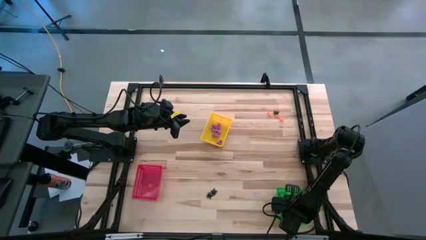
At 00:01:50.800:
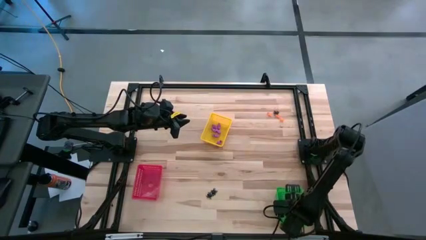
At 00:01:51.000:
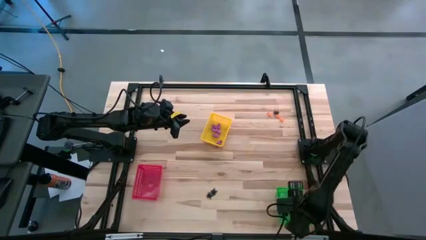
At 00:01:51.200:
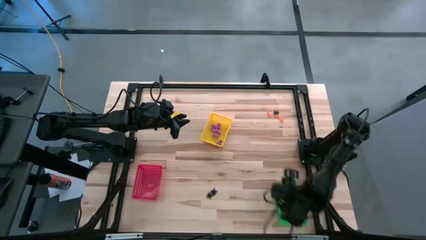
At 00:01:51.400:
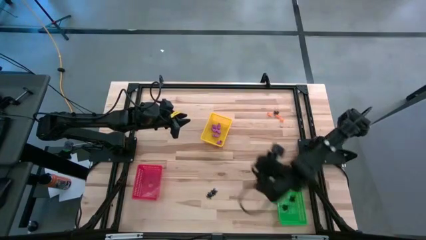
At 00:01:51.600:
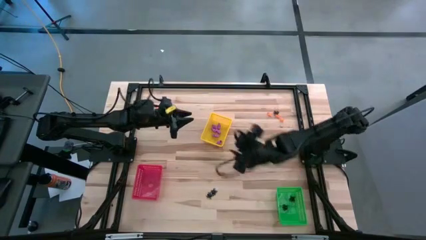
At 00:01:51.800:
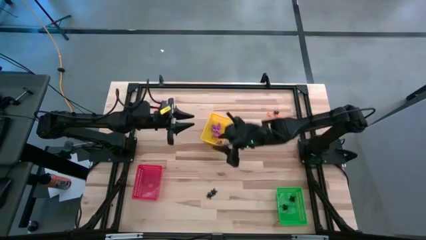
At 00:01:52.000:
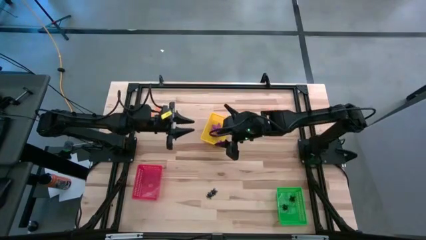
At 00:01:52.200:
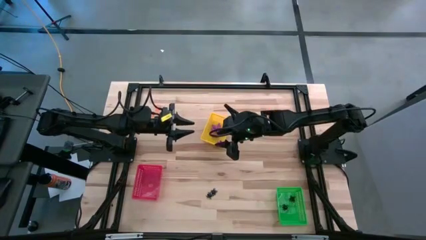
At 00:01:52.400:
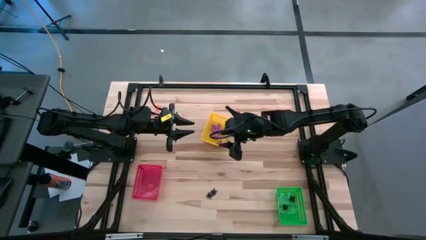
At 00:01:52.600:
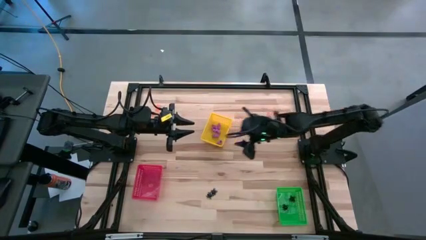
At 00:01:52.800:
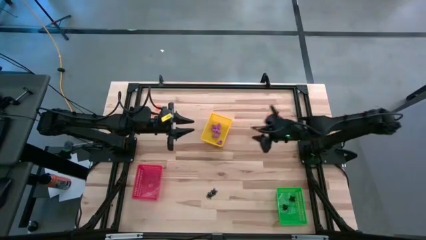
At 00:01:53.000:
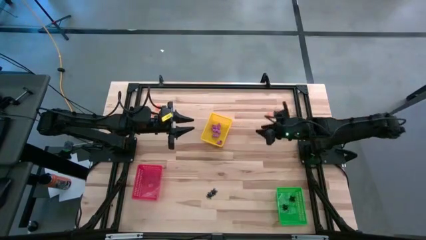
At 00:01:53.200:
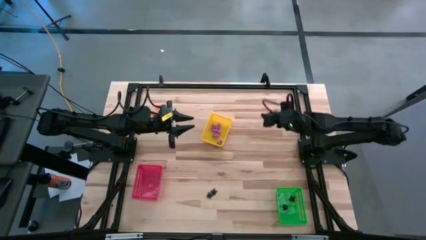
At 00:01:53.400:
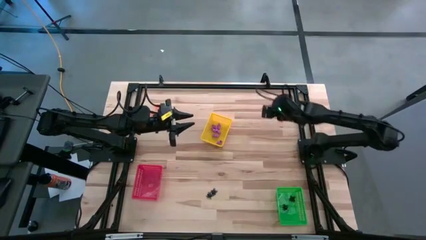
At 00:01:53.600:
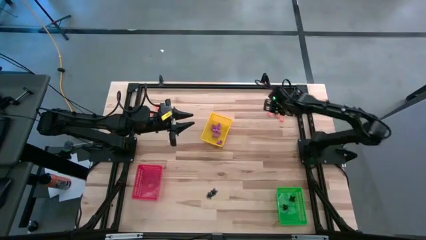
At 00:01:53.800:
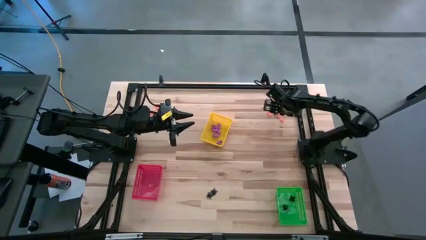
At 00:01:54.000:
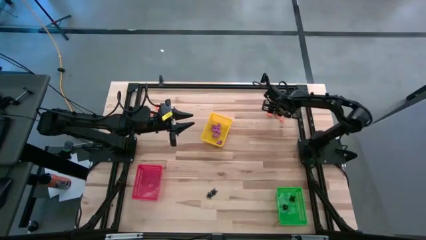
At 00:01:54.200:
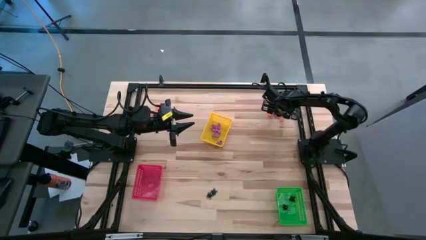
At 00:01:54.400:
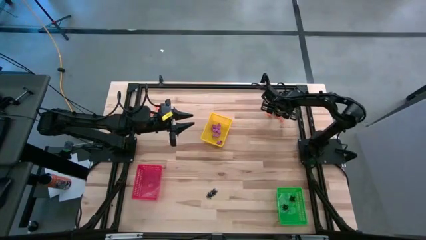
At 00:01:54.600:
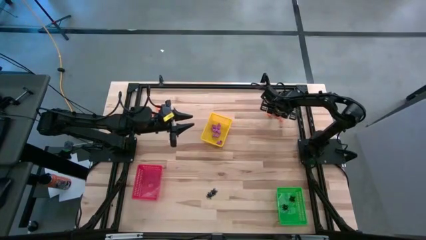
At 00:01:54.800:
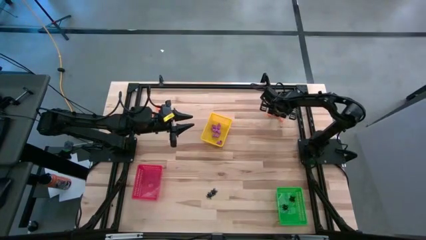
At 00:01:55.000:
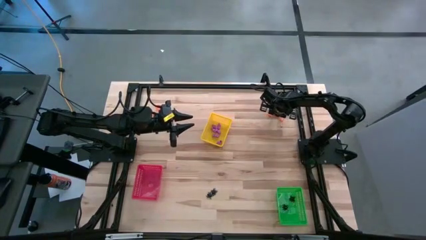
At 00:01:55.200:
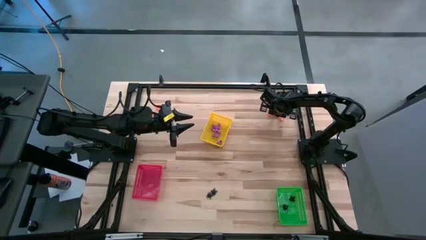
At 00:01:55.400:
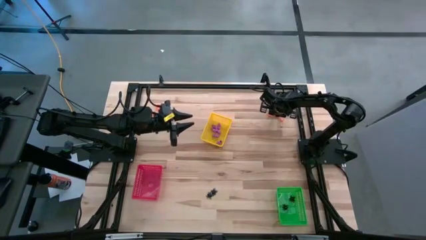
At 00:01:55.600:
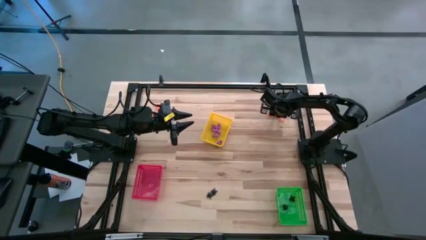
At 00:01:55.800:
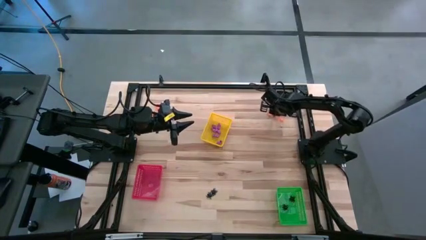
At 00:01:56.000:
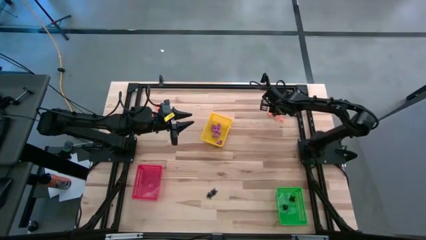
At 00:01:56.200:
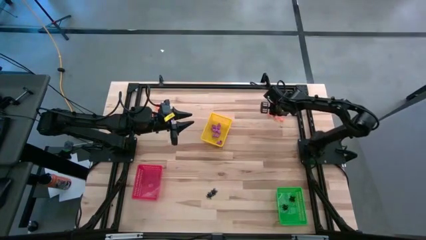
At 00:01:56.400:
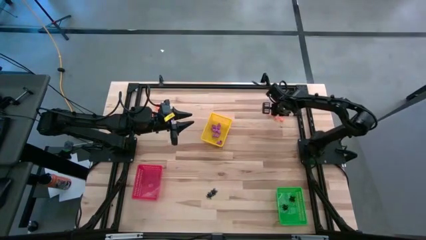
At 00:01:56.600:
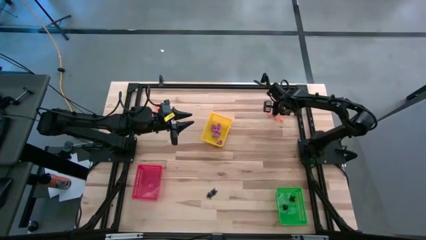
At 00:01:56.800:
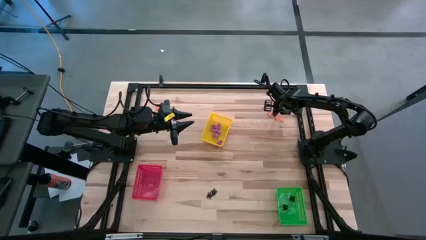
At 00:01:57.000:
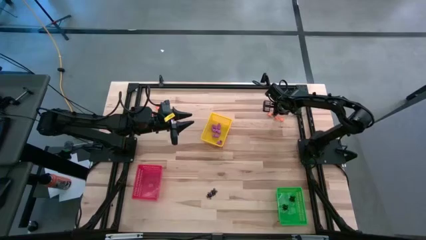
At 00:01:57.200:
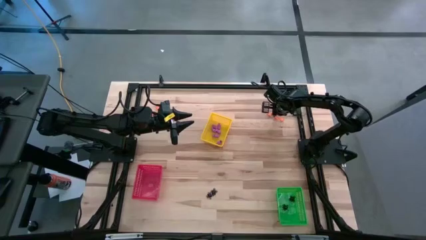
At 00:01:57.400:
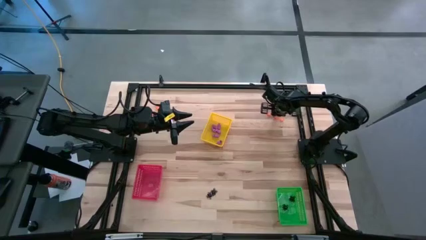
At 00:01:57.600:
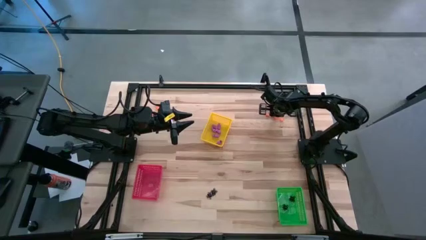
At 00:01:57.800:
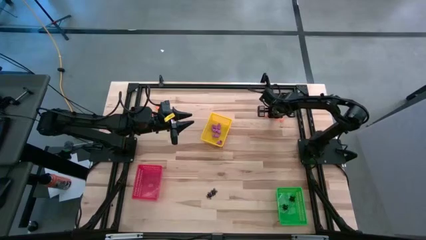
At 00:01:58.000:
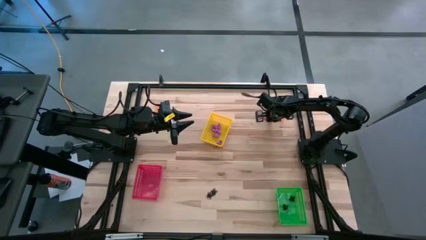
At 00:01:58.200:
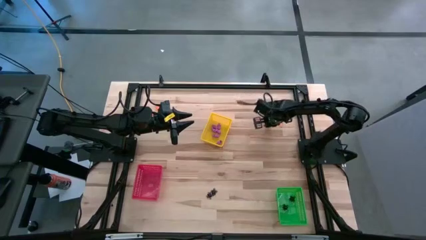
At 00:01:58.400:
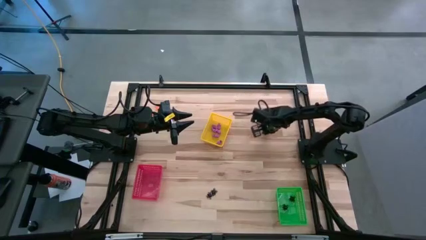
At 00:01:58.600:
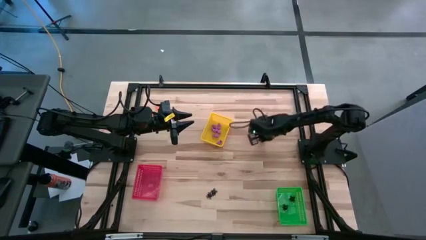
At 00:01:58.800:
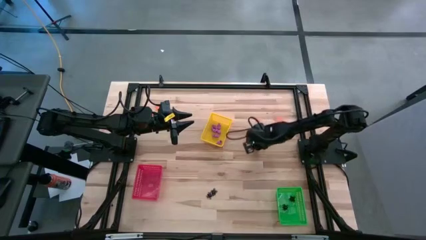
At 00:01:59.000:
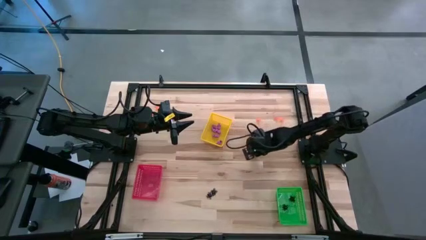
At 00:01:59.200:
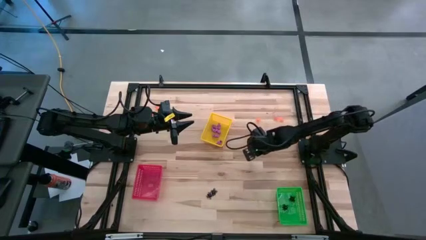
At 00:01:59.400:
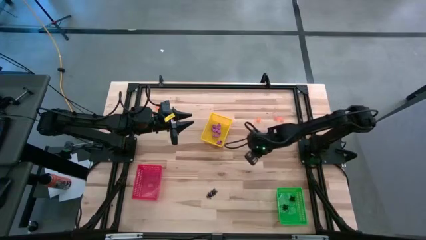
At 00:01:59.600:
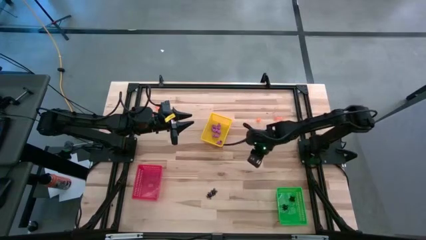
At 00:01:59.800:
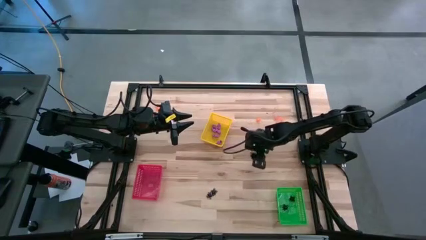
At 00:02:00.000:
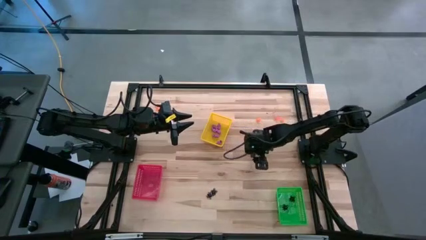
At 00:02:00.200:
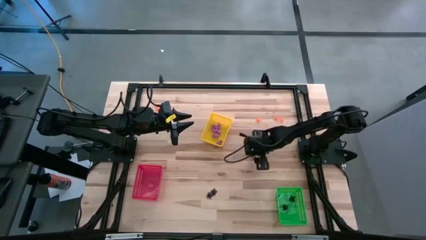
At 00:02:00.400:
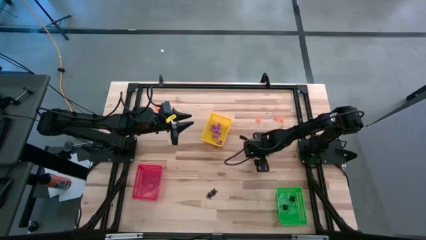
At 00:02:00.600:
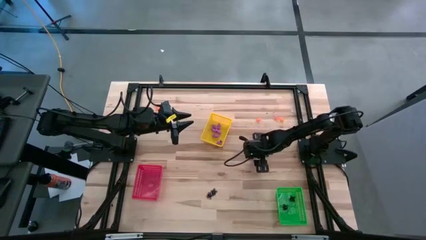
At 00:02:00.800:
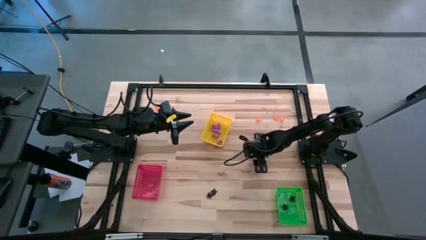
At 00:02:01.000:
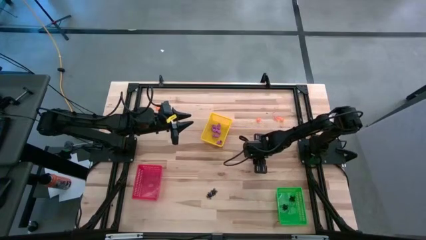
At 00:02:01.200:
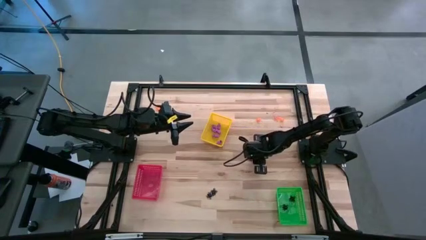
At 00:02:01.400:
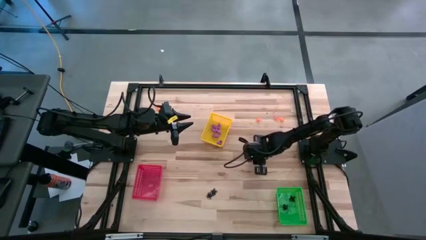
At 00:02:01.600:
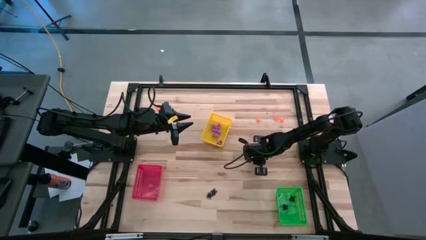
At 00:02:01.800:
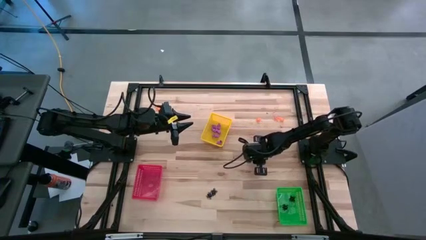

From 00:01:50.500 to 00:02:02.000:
Task: Sort Halloween decoration
Put the black spider toy into the green bin

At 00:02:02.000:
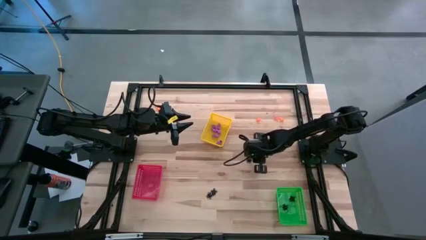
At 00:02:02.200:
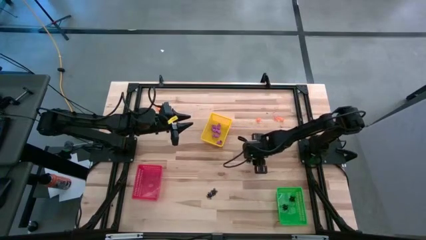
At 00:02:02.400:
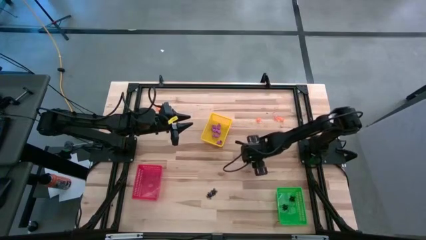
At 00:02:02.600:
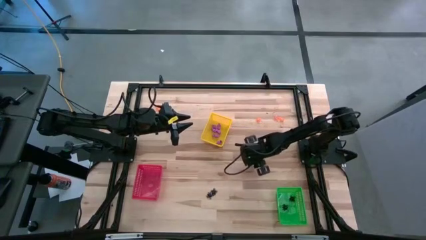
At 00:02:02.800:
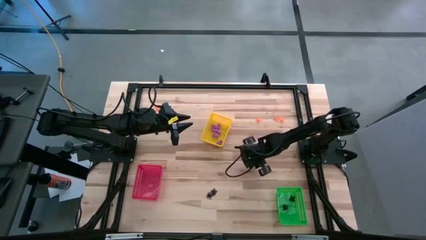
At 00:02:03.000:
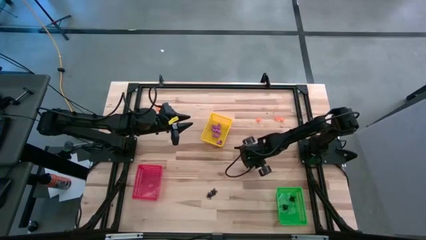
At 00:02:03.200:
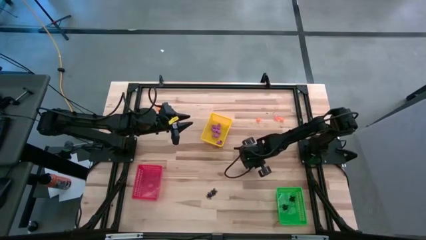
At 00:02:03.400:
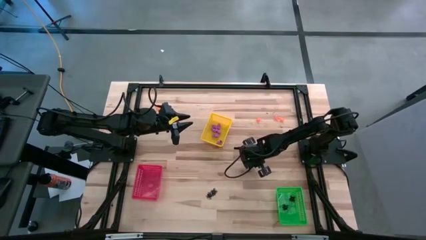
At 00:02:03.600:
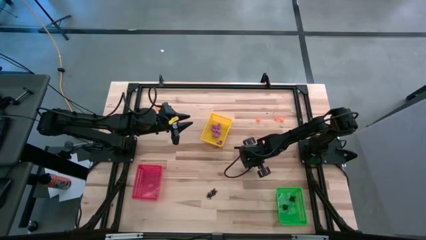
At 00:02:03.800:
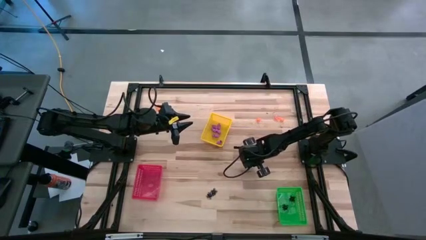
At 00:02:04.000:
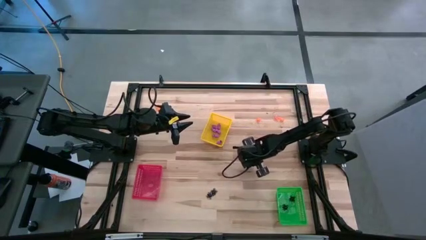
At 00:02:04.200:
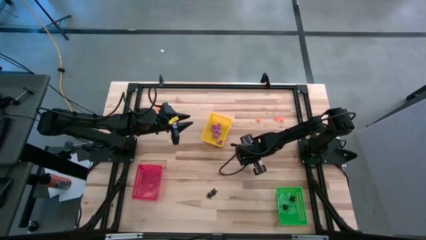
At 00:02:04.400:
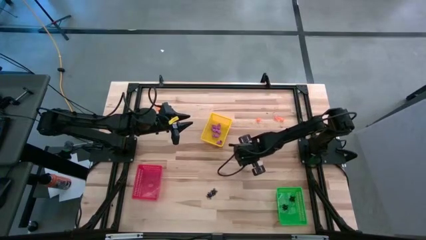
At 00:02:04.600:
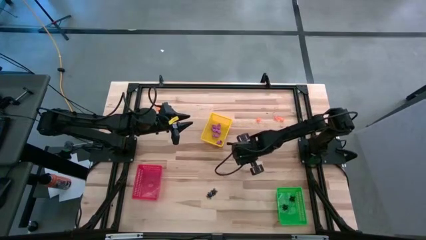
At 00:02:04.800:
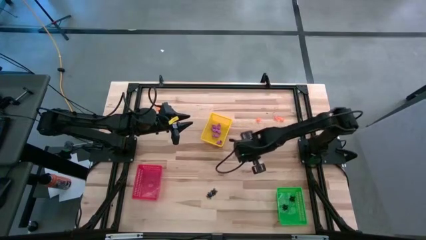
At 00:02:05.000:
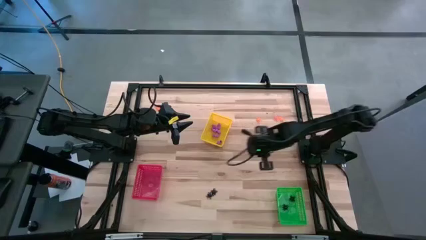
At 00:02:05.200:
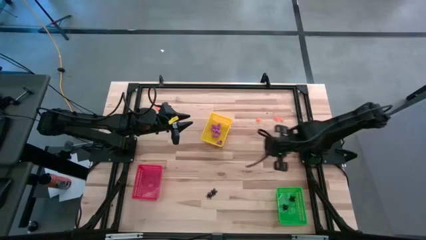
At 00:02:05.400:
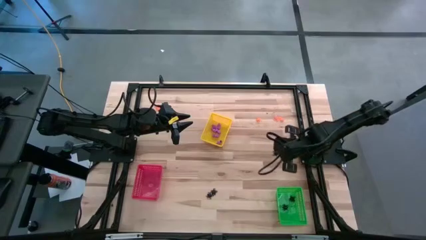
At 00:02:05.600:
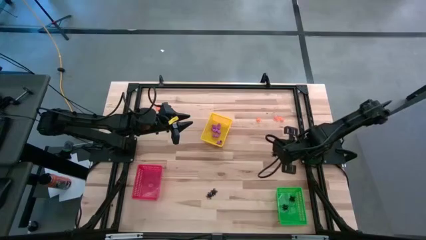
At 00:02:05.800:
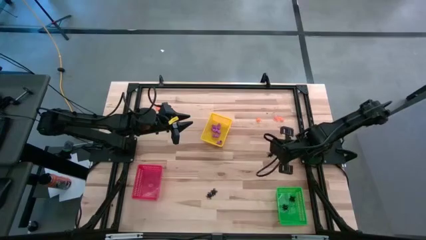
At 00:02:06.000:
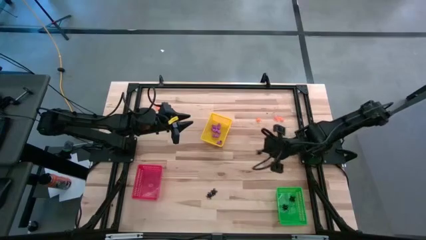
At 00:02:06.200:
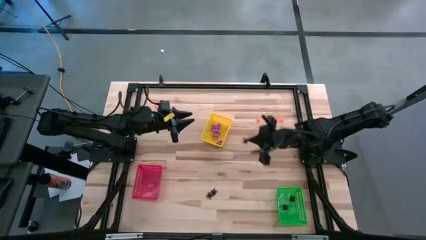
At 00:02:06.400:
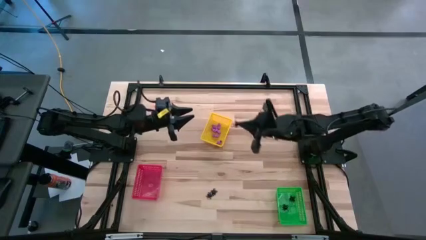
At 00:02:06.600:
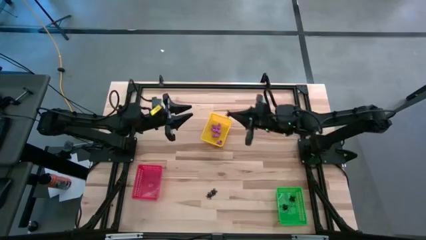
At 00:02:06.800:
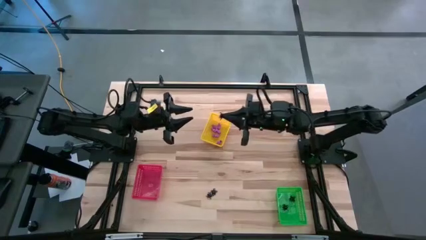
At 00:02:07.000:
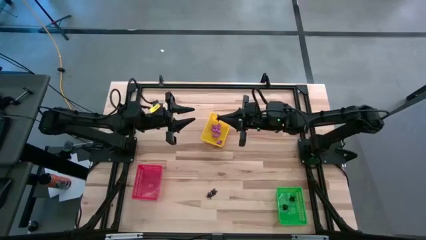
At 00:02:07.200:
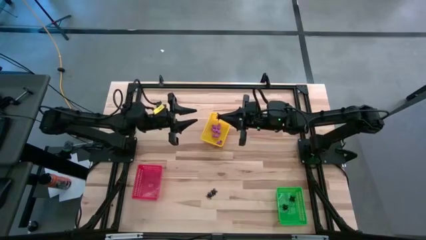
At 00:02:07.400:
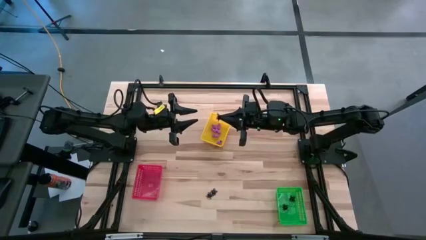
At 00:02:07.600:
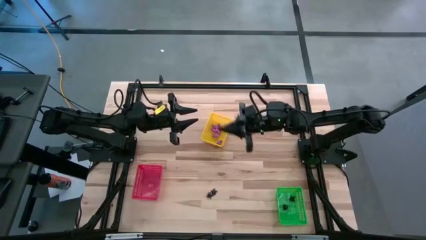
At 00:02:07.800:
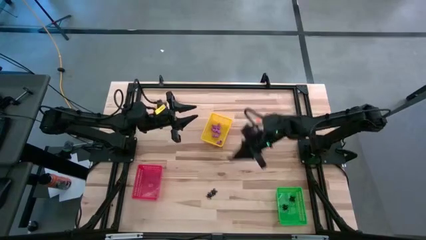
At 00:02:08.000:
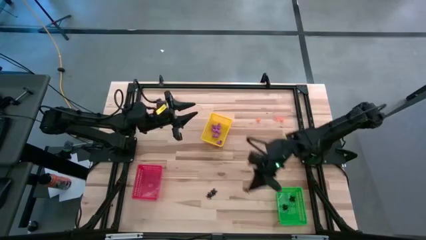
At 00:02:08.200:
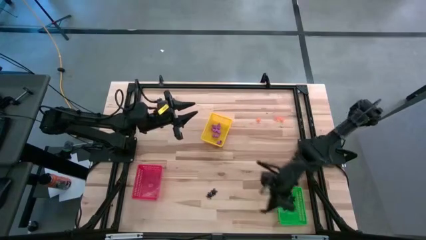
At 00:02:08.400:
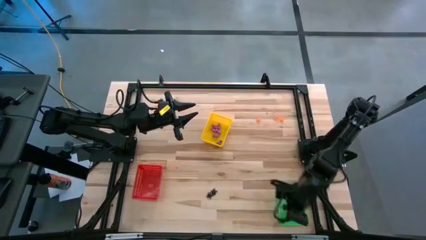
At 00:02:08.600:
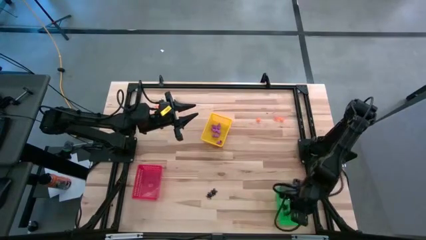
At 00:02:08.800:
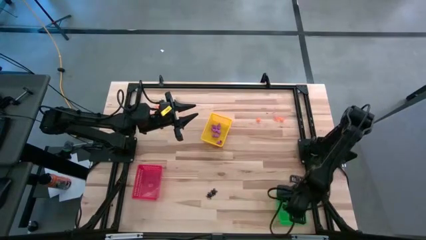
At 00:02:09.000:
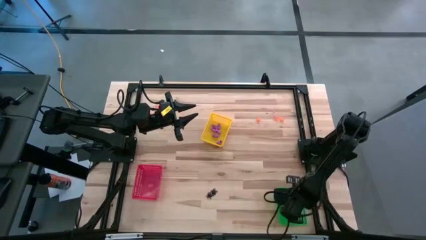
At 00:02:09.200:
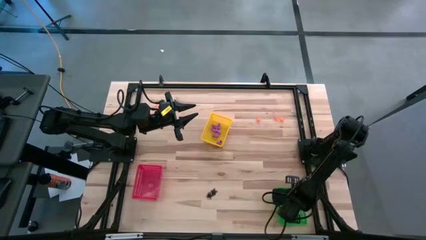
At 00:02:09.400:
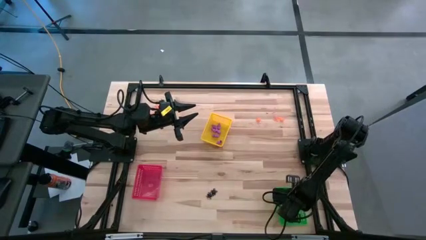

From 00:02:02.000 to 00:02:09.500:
Put the black spider toy into the green bin
